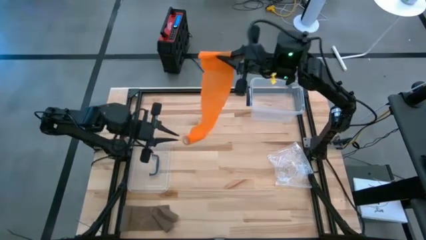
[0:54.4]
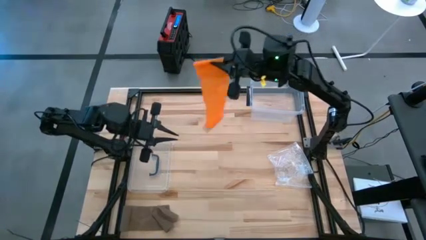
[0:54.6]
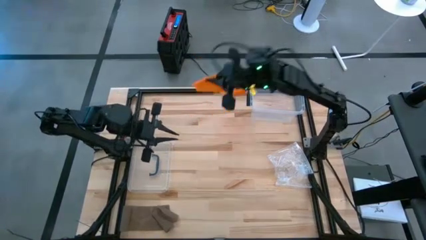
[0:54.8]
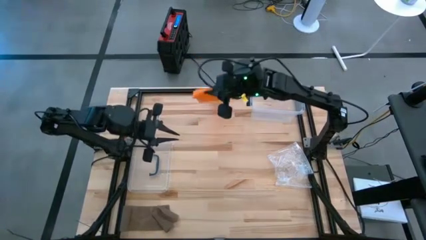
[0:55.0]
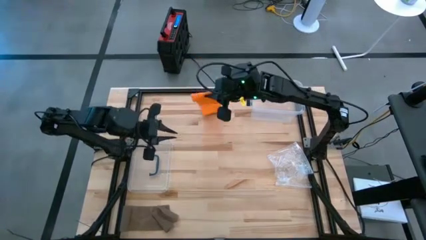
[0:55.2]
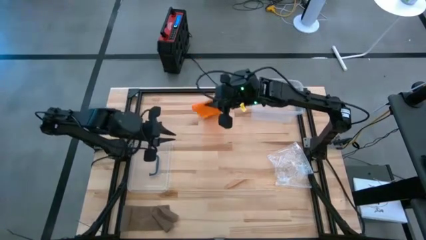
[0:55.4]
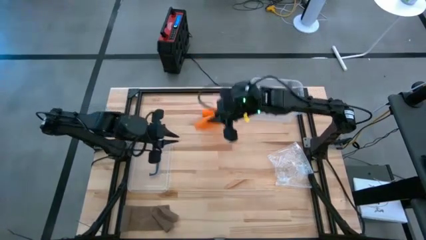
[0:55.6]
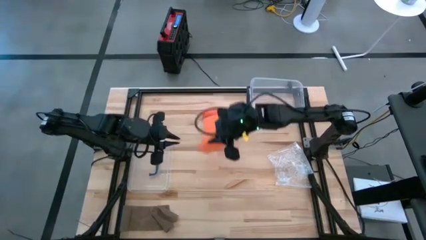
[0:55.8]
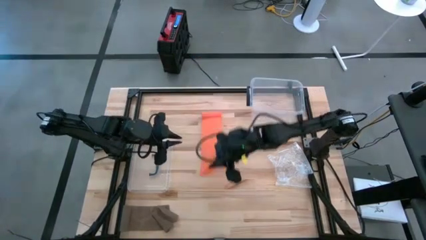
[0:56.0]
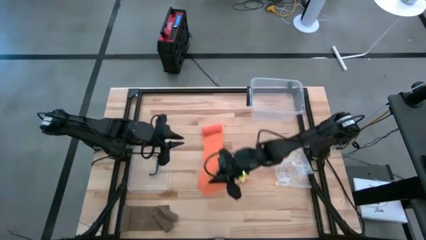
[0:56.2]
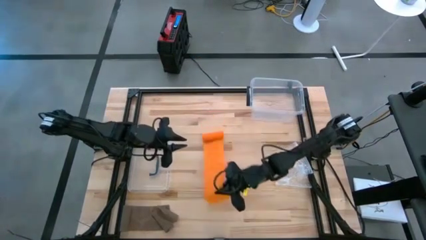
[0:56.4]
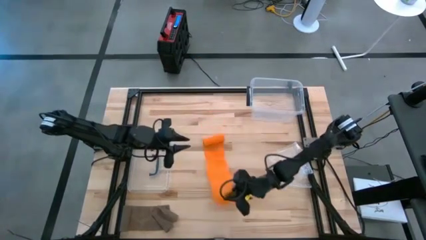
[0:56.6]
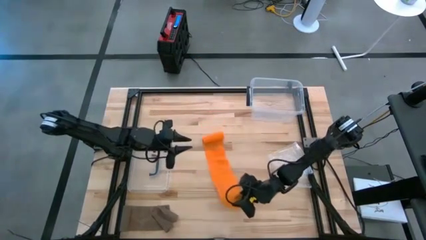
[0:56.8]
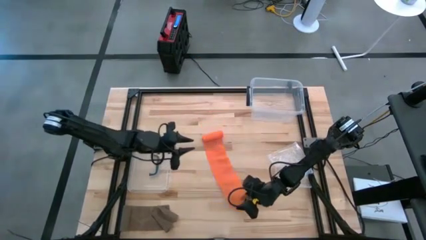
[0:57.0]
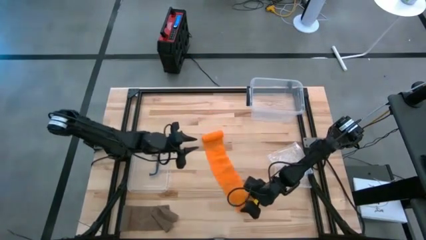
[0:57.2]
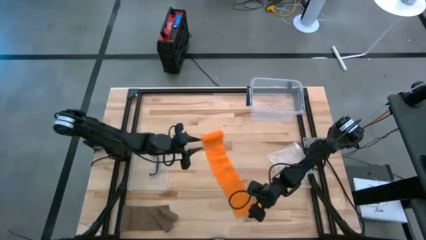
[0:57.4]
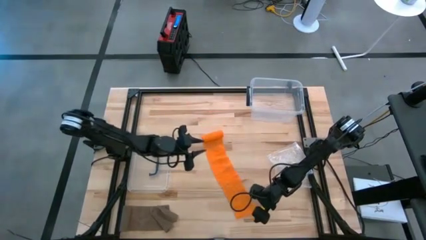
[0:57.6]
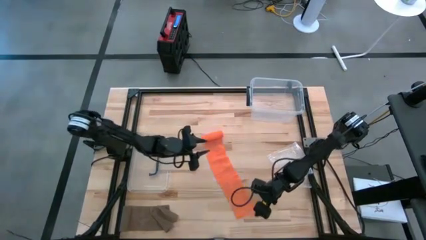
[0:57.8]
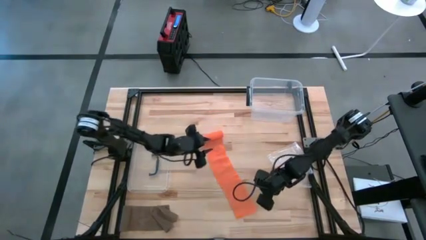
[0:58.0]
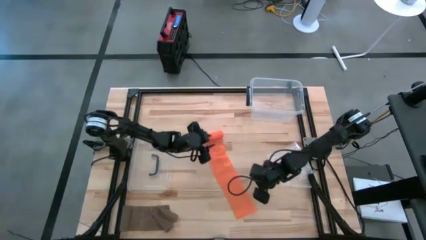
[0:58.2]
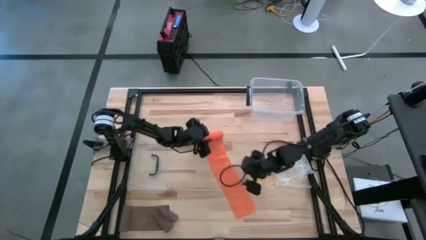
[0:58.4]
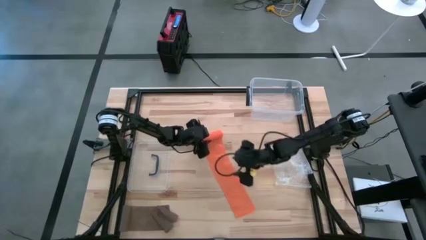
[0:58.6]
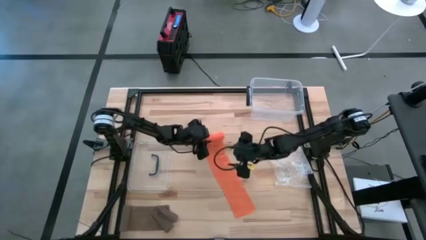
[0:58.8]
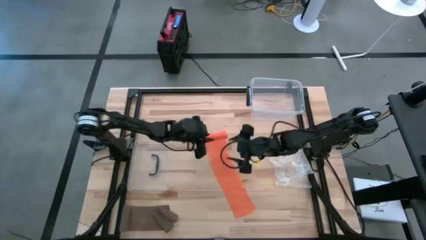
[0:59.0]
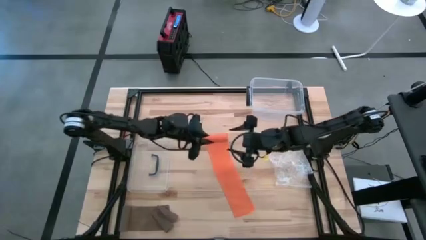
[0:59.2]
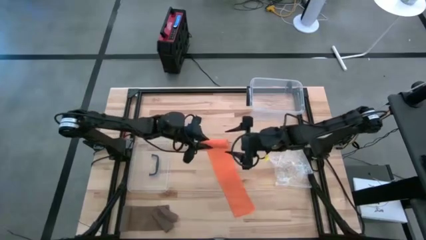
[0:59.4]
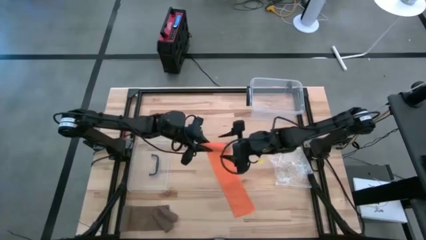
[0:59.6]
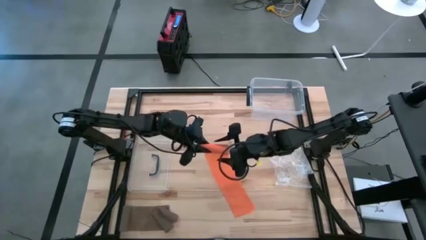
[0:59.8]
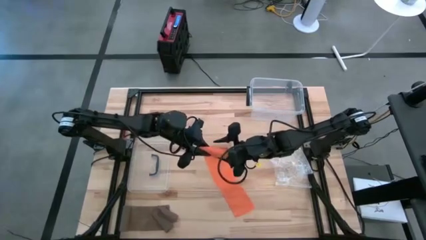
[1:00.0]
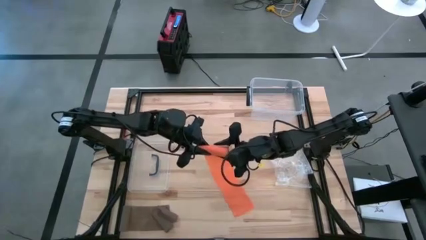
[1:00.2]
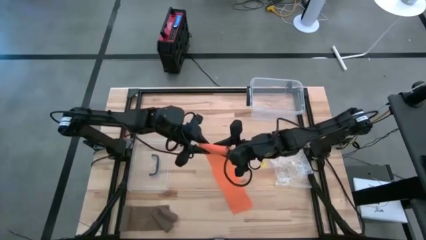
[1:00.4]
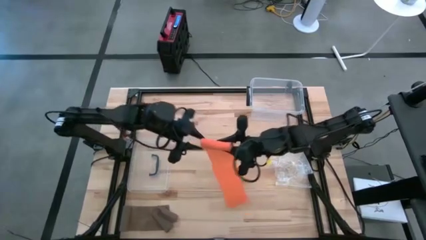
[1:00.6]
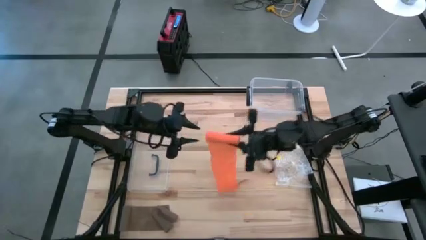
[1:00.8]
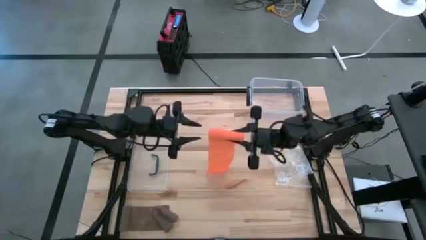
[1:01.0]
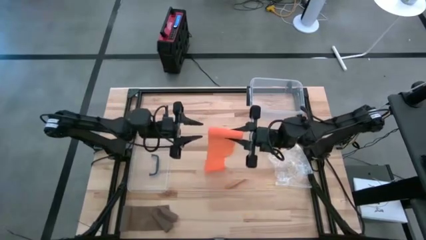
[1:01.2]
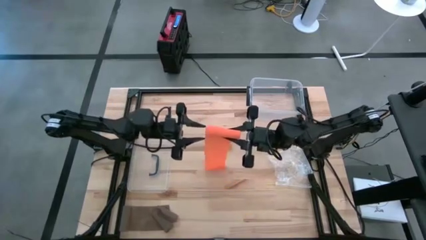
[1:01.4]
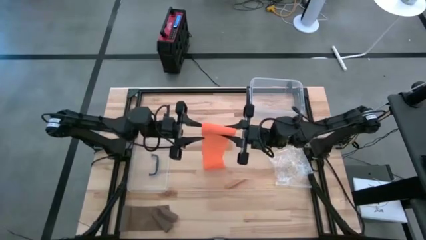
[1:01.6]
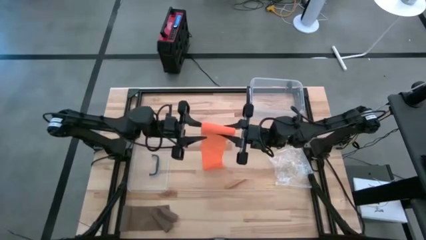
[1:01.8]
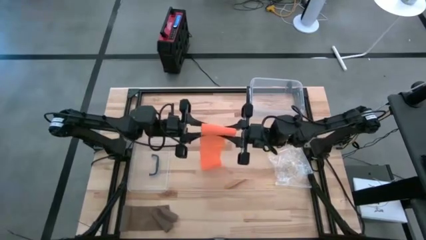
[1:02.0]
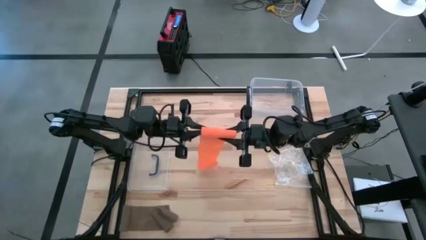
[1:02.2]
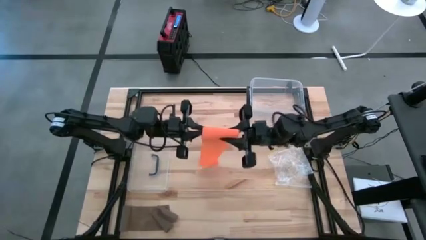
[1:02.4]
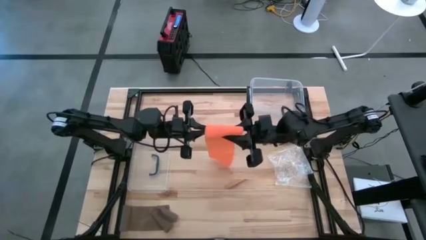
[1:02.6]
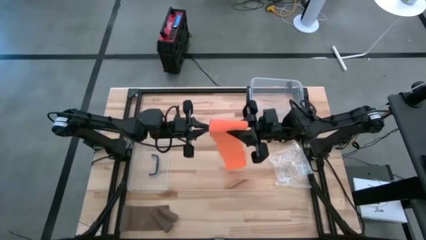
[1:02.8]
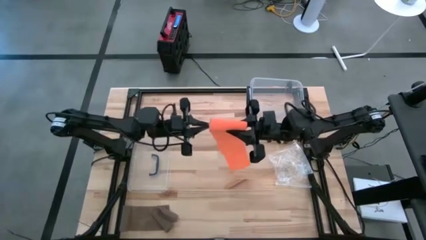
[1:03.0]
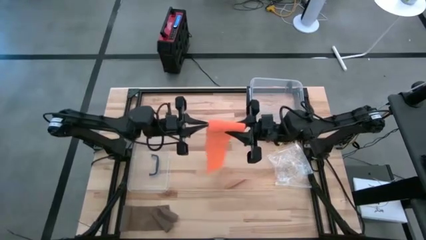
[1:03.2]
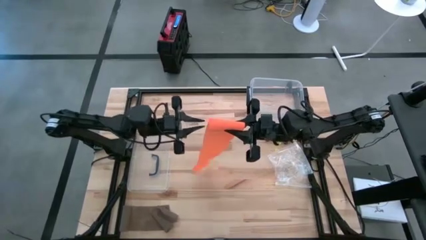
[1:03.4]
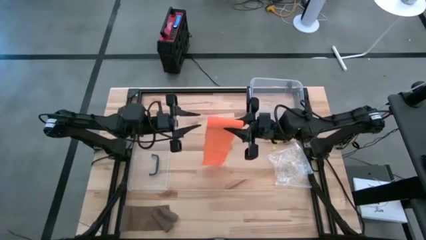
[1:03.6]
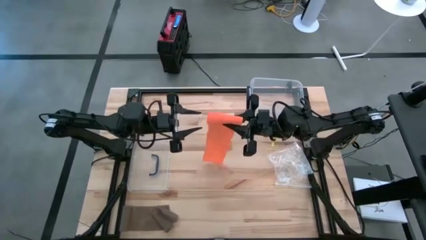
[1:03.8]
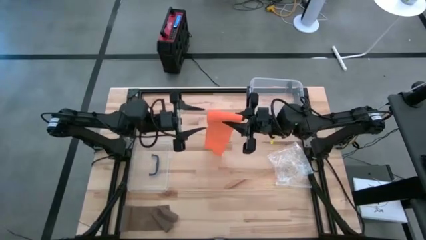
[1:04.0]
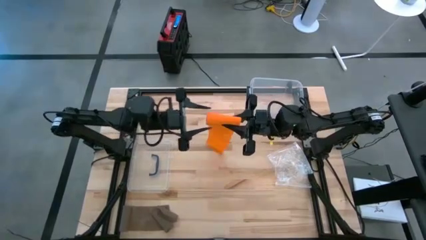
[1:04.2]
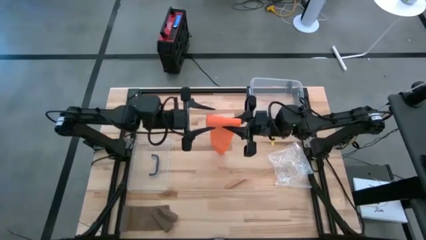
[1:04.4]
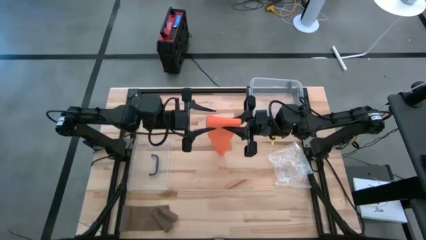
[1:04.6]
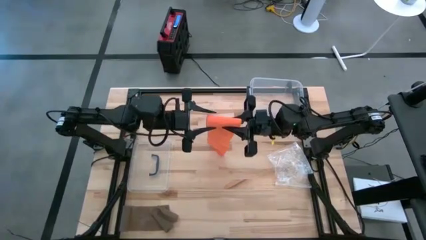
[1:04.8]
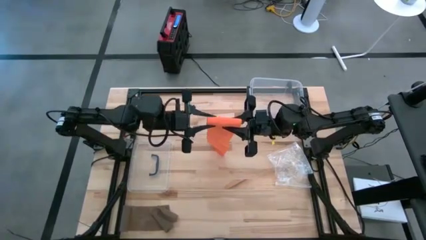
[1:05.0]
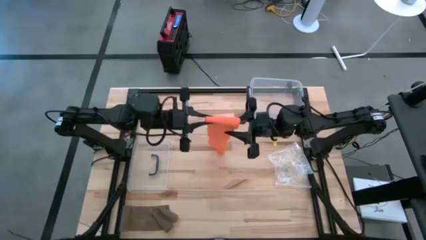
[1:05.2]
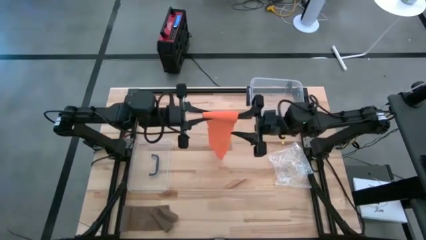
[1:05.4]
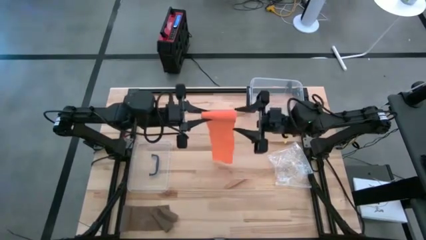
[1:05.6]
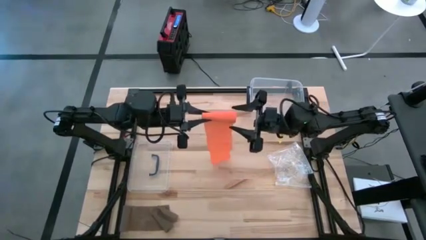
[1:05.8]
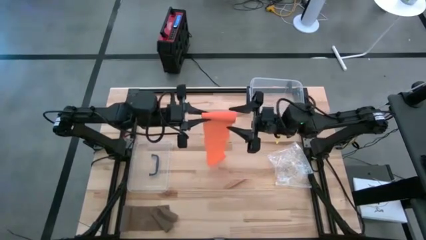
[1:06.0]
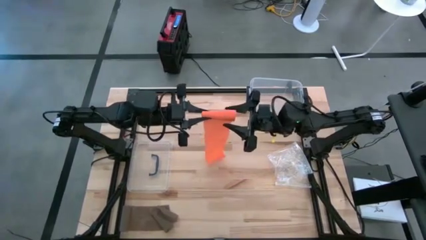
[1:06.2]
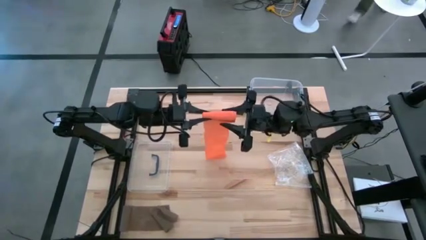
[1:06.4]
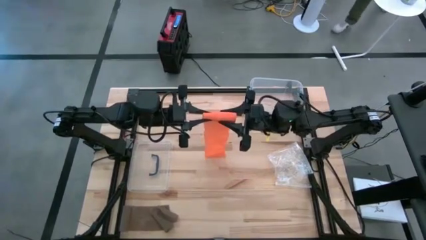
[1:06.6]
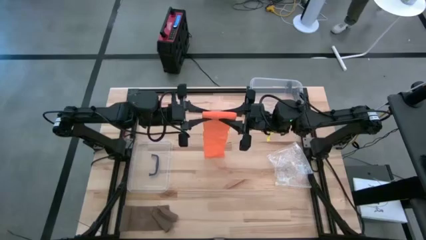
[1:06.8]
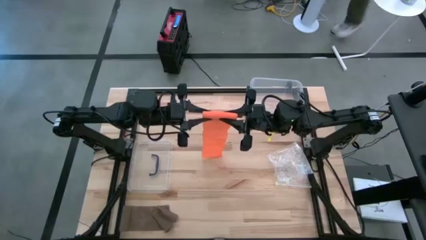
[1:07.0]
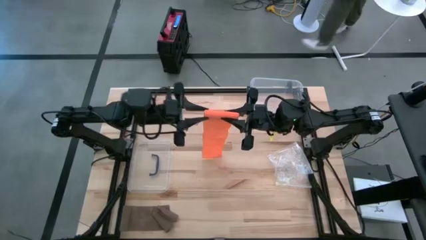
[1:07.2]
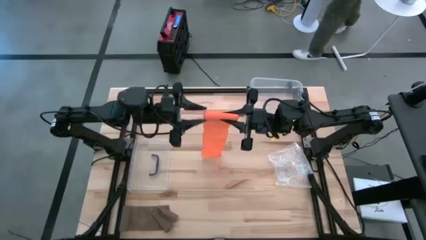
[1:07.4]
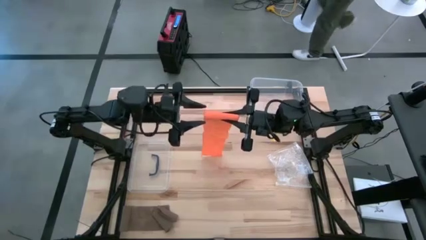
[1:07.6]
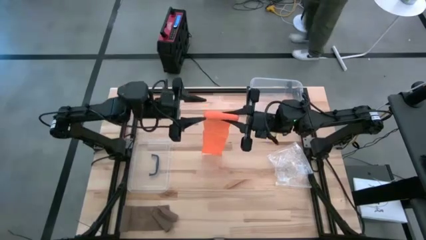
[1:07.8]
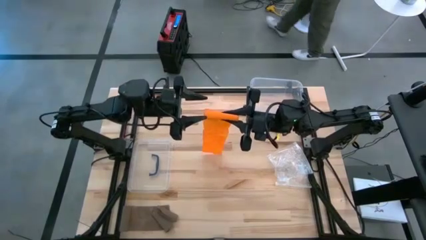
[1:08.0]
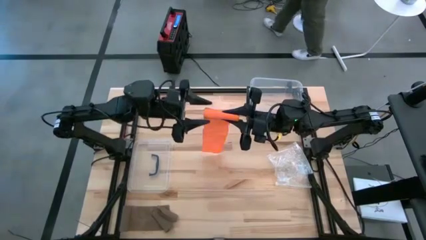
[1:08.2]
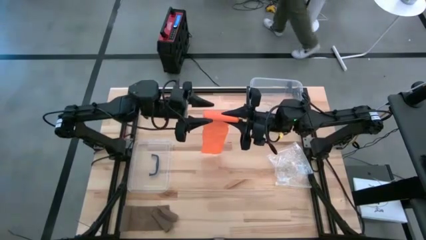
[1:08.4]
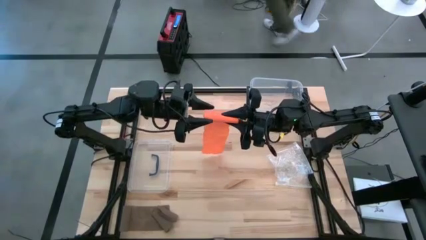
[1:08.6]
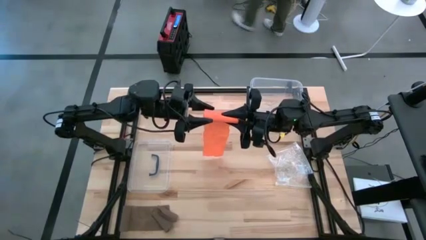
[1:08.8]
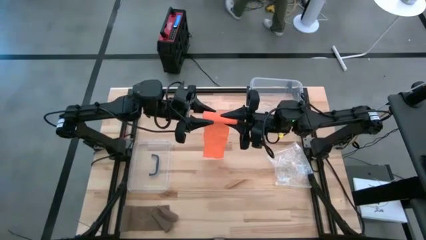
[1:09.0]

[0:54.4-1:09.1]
Task: Roll bandage
Roll the orange bandage

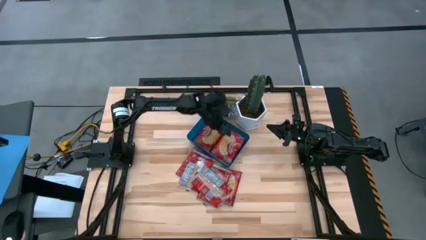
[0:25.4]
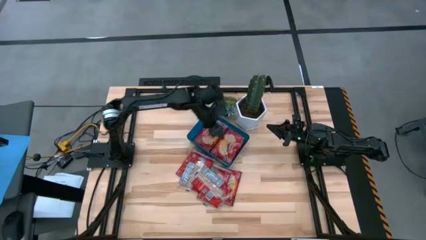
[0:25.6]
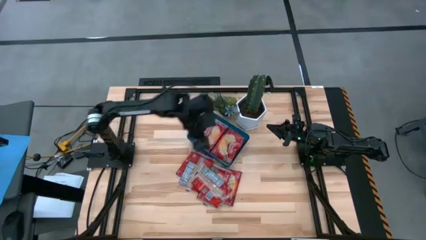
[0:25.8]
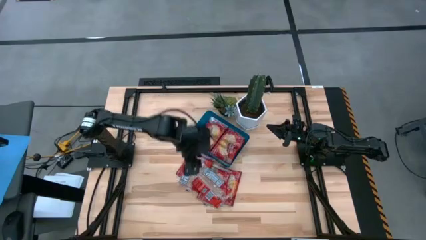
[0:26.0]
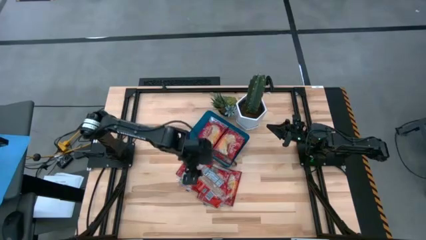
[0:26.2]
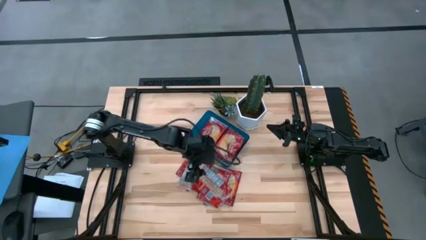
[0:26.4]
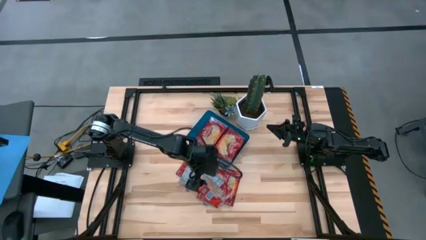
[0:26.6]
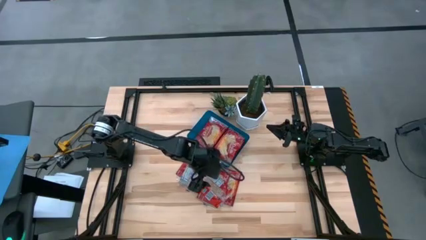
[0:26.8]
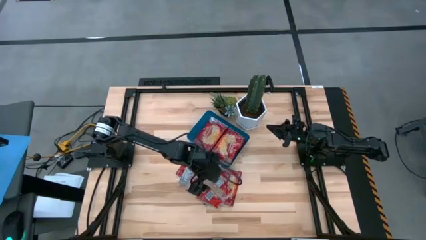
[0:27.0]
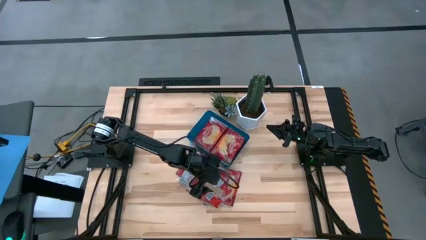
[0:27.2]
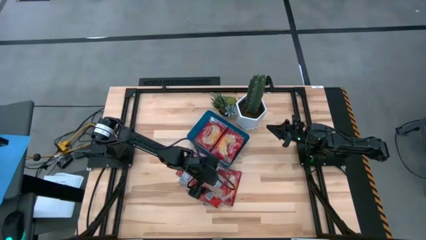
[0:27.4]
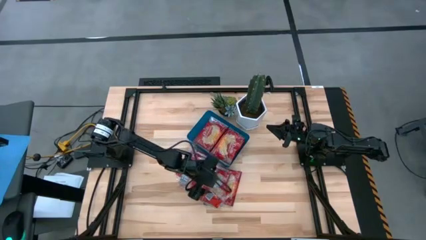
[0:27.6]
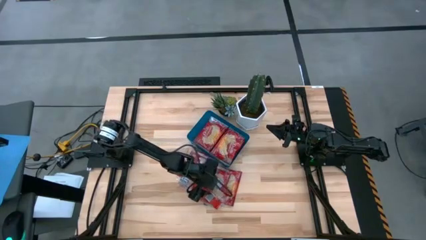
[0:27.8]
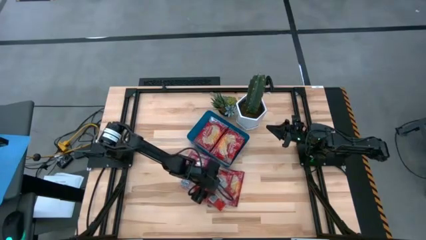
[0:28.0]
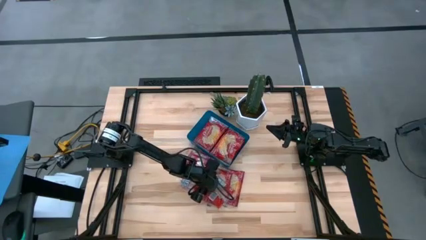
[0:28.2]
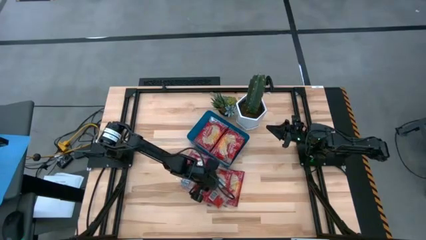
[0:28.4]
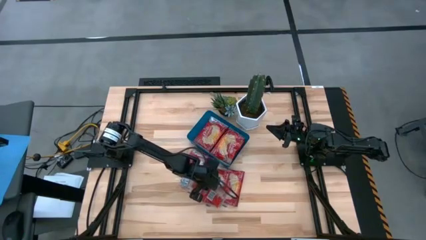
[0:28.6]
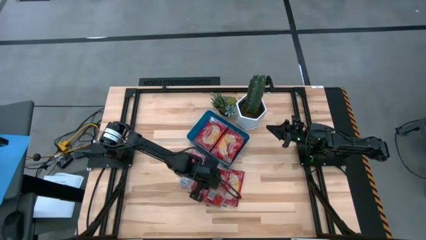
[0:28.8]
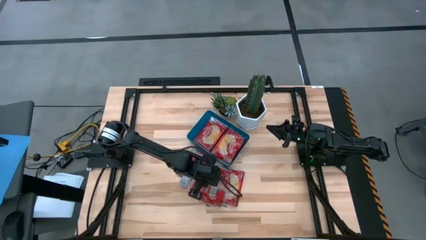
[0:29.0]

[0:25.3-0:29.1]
Task: Sort popcorn bags into baskets
Put the popcorn bag into the blue bin
